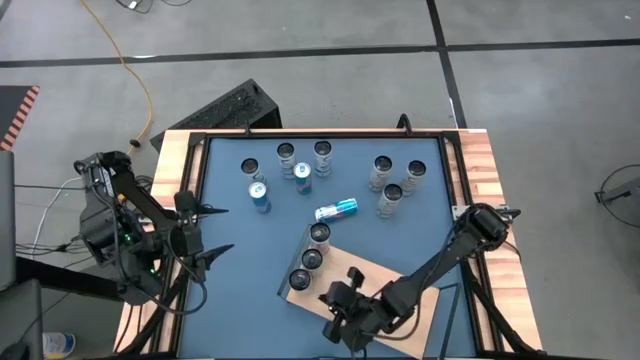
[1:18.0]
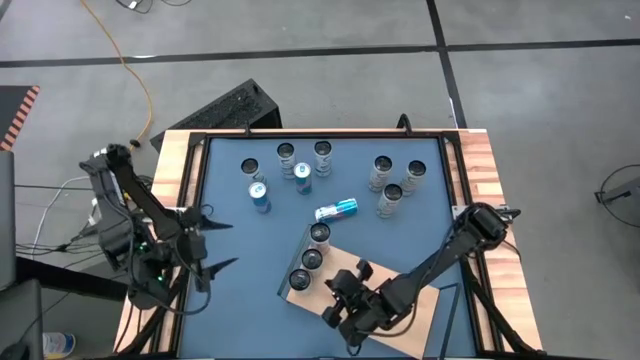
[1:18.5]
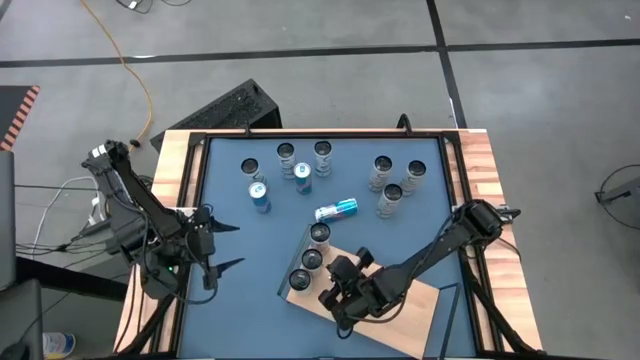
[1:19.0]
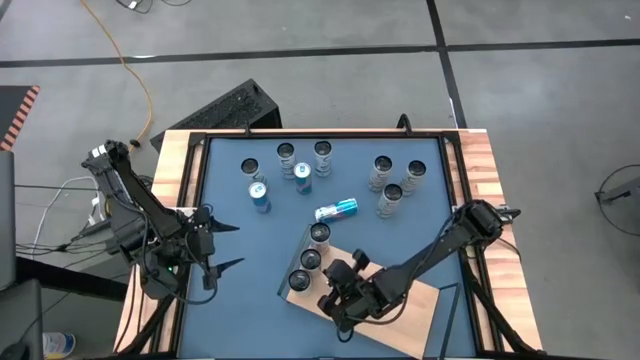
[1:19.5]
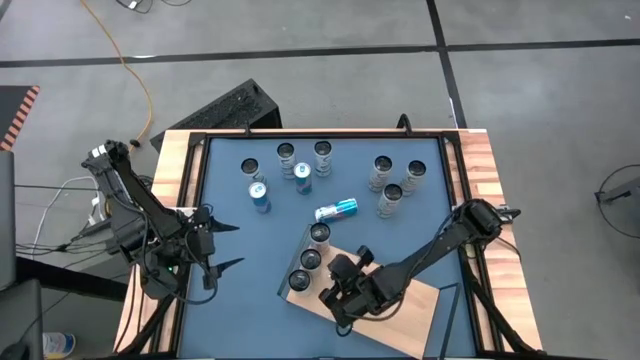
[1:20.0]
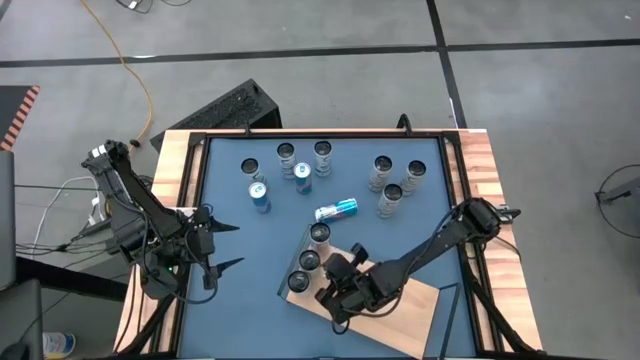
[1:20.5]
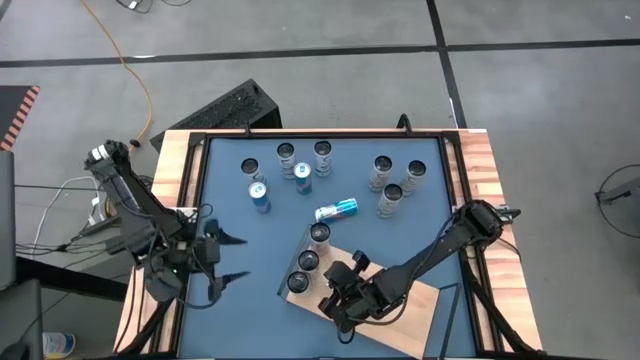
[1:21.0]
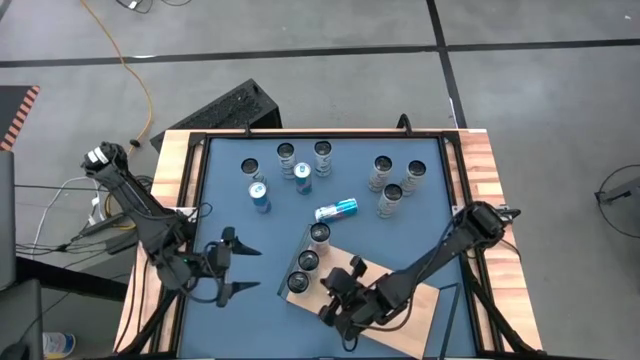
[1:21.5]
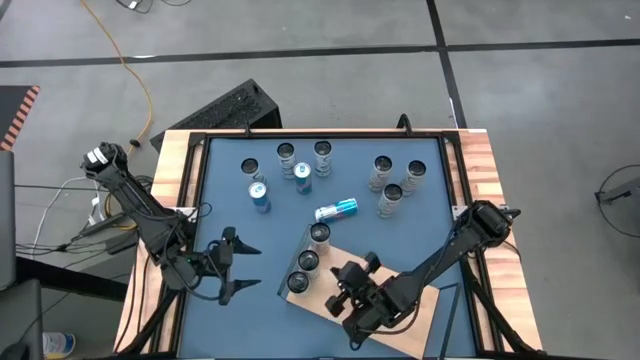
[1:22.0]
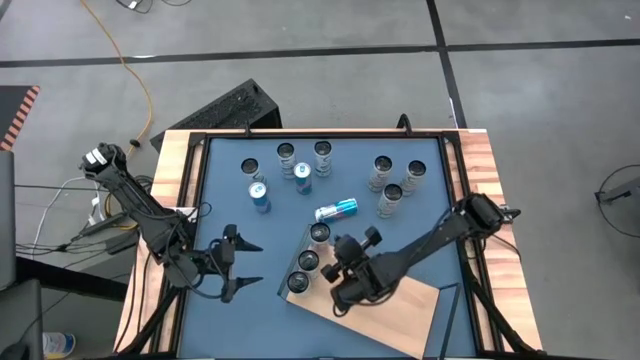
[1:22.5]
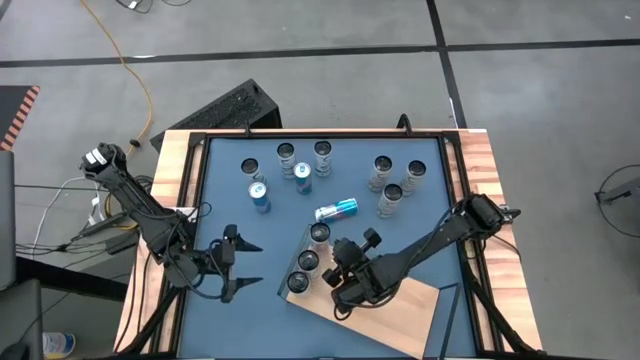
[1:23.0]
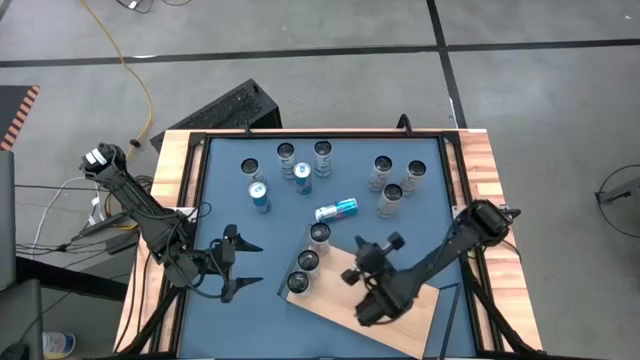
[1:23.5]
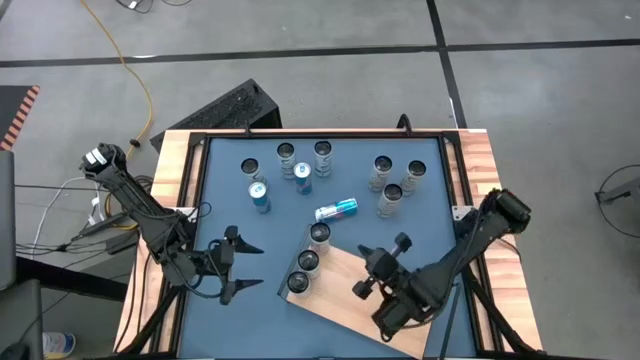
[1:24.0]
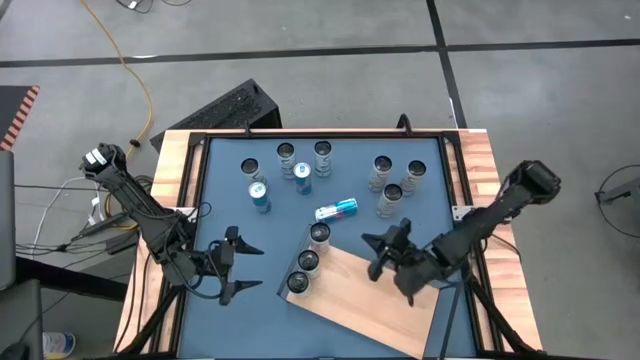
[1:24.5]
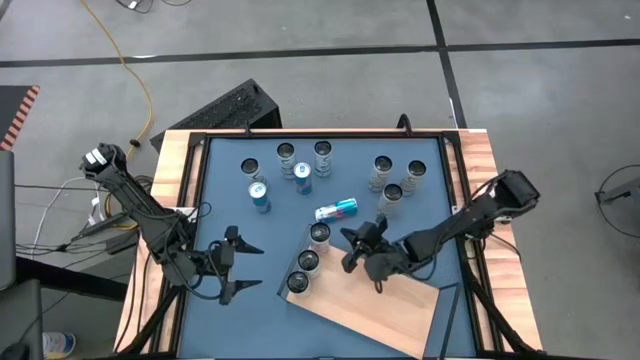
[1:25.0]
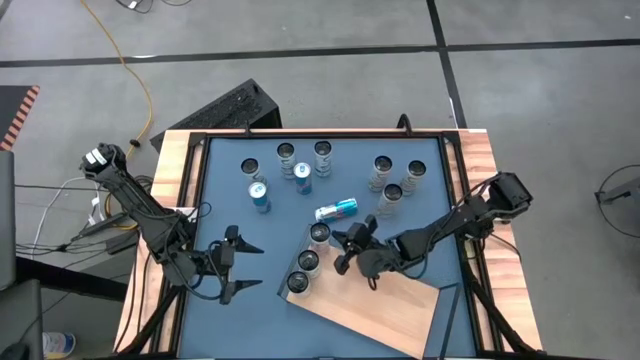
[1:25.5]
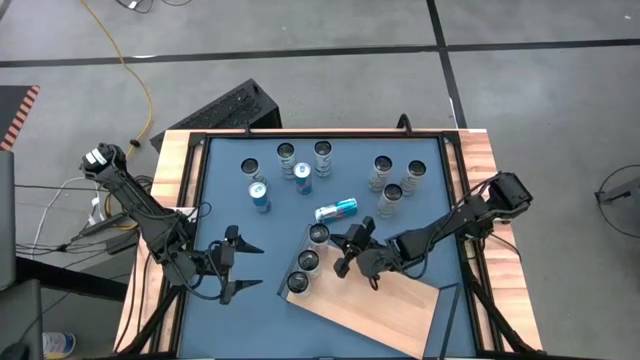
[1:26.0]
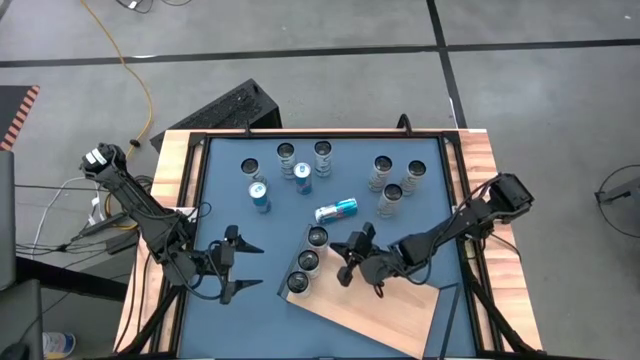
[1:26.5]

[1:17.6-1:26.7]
Task: Place canned beverage on shelf
Adjust the white pink soda cans on the shelf

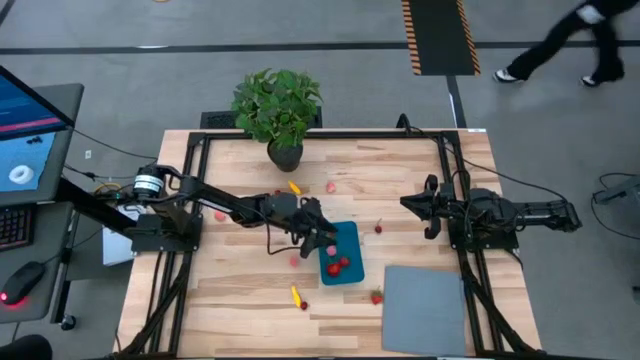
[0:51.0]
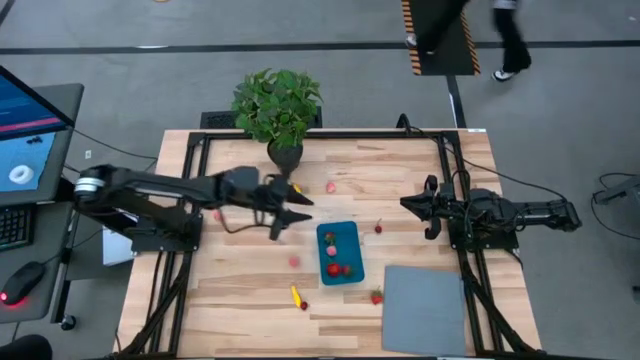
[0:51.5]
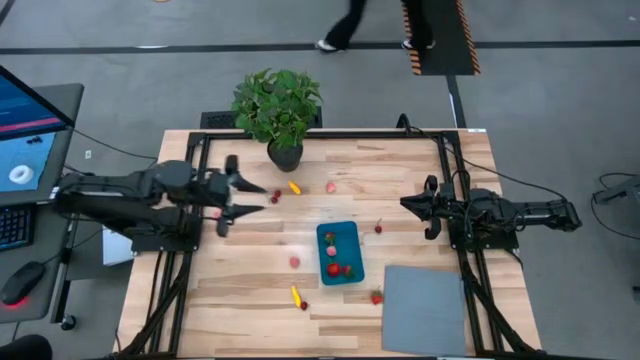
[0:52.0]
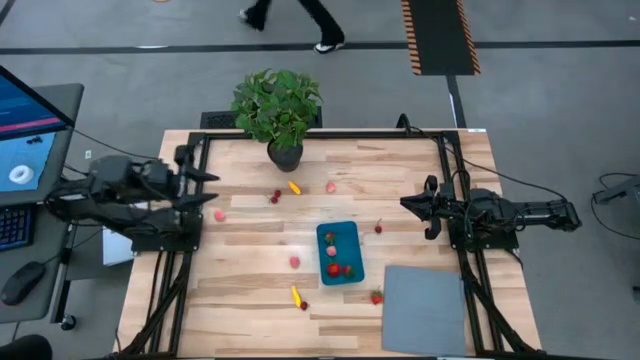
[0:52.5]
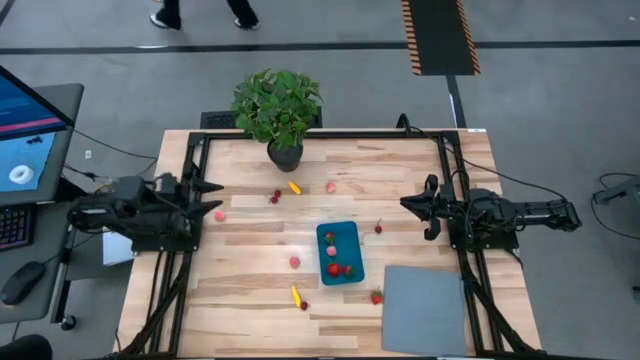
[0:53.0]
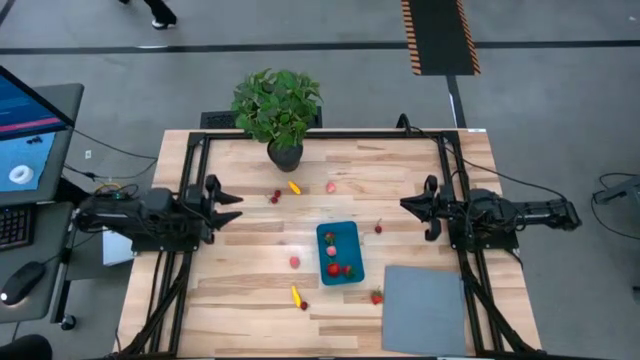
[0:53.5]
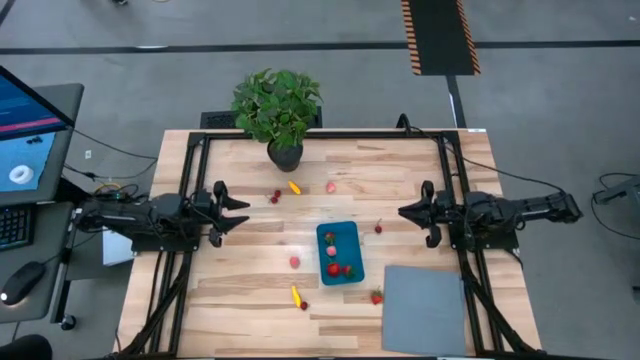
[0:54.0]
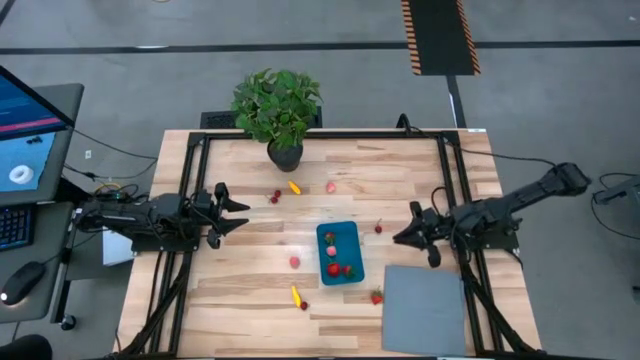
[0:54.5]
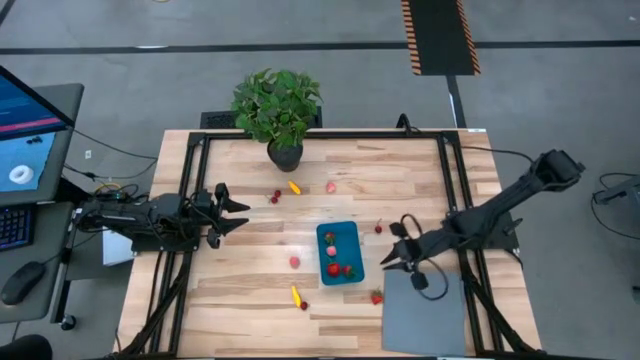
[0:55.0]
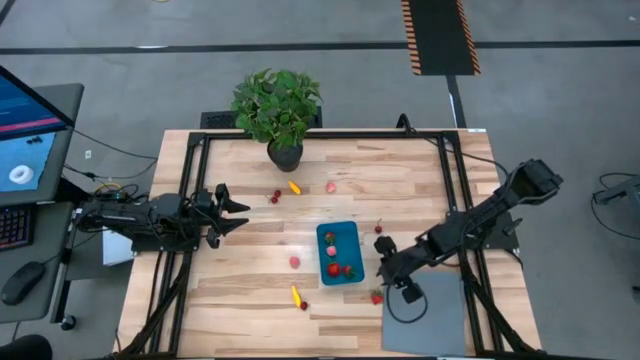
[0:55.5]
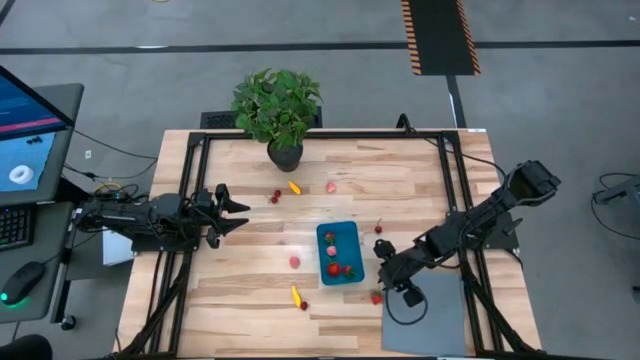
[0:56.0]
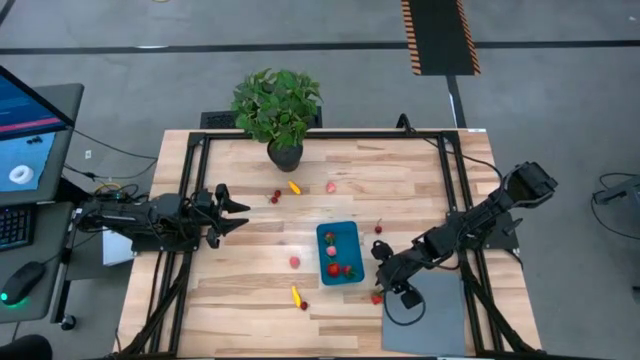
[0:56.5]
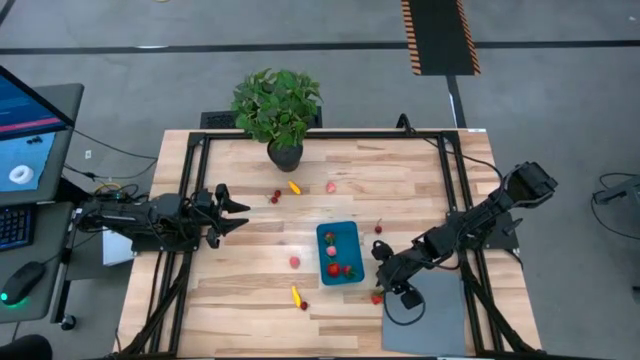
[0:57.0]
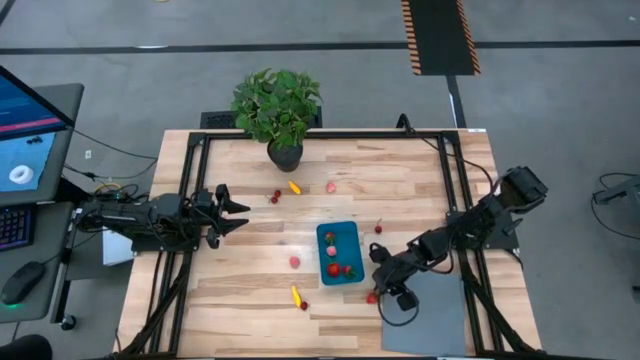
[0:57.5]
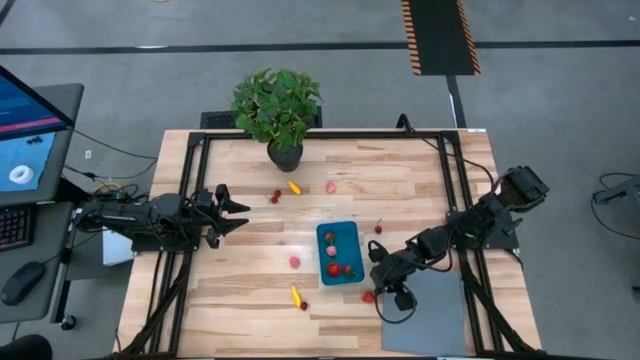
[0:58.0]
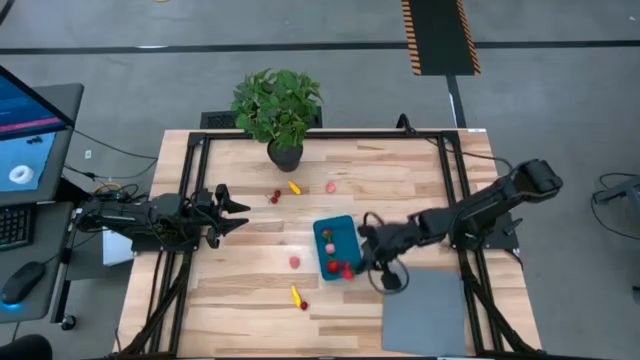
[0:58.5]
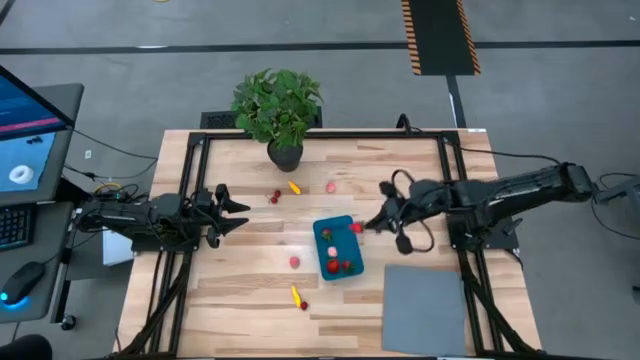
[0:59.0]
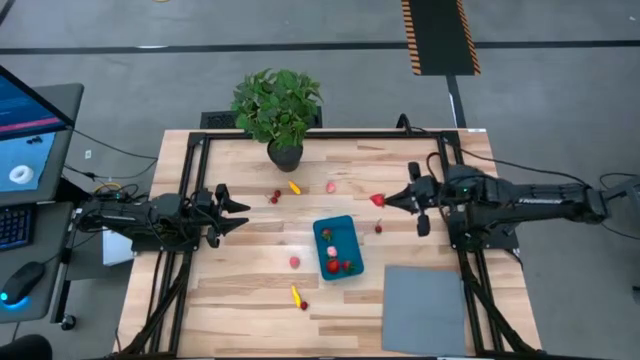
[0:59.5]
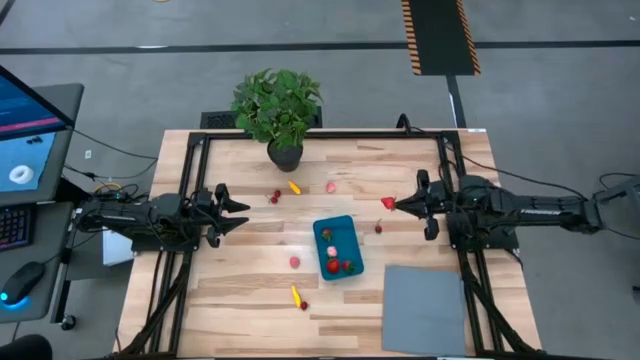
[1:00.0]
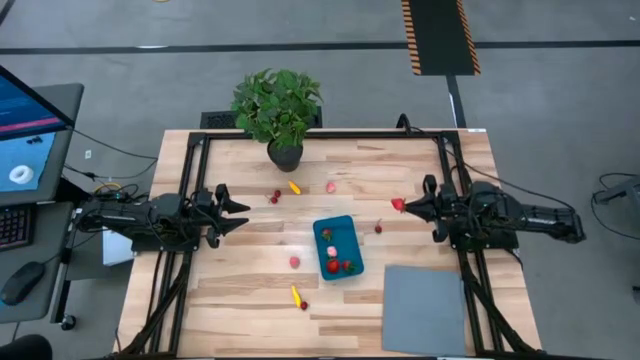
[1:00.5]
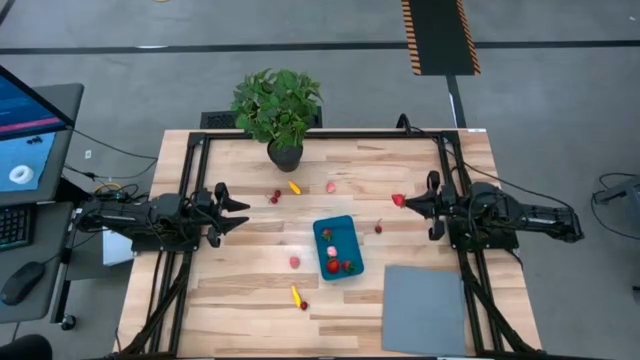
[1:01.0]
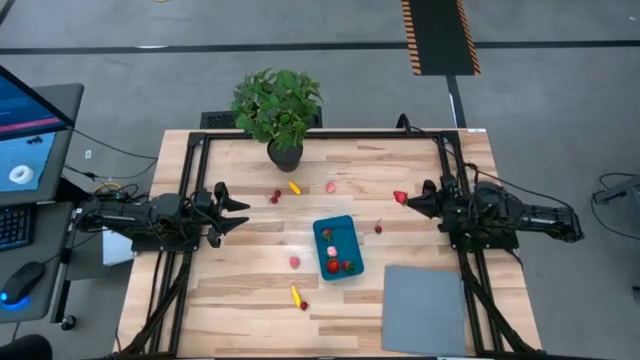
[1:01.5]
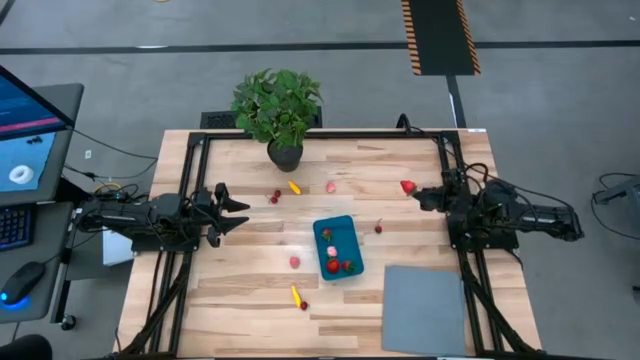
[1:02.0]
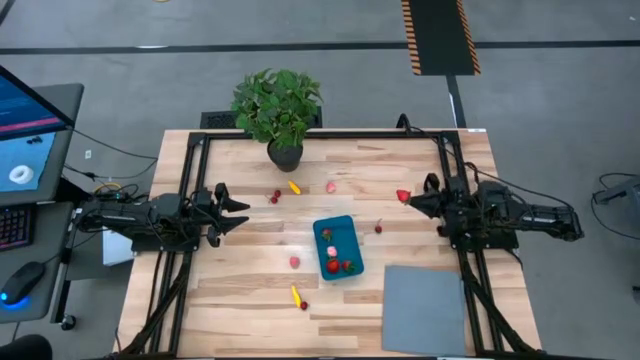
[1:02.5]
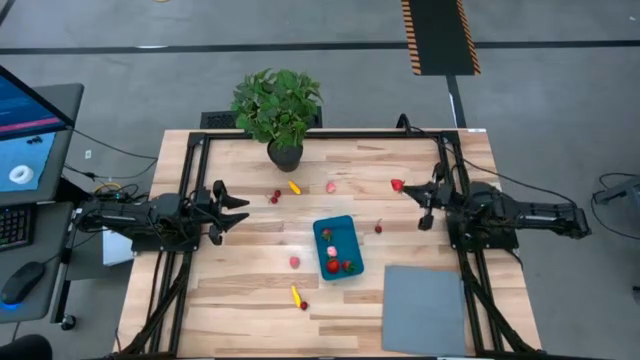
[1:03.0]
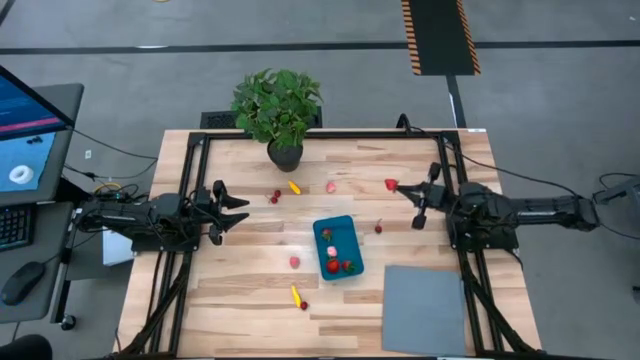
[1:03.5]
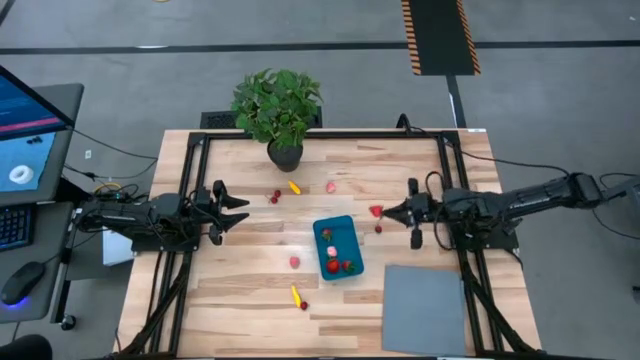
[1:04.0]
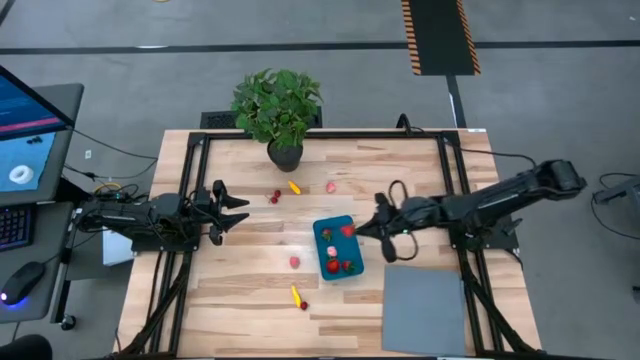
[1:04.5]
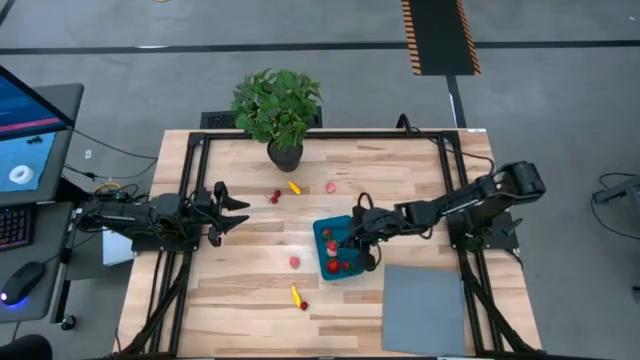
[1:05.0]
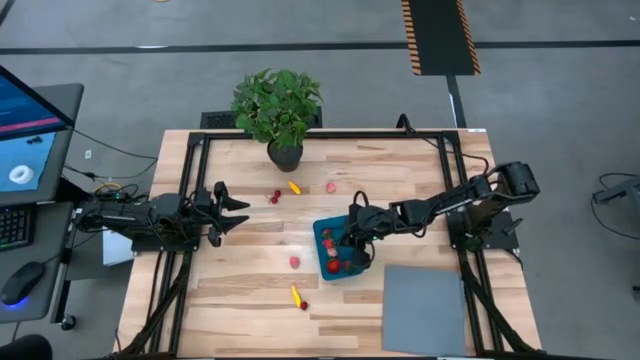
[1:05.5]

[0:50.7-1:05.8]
Task: Pick and placing Produce into tupperware
Put the strawberry into the blue bin
